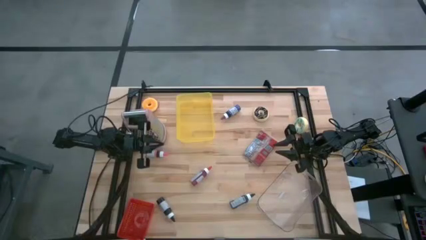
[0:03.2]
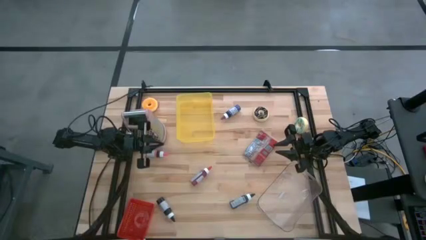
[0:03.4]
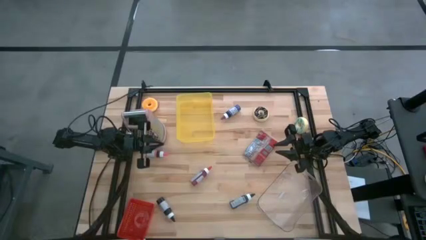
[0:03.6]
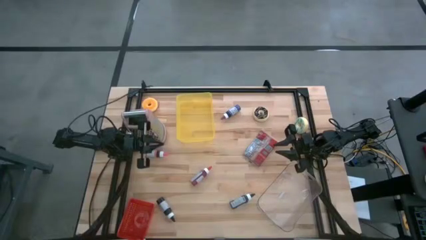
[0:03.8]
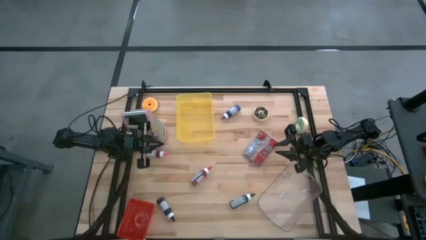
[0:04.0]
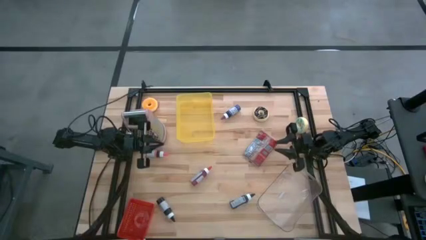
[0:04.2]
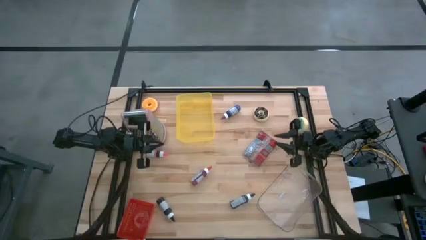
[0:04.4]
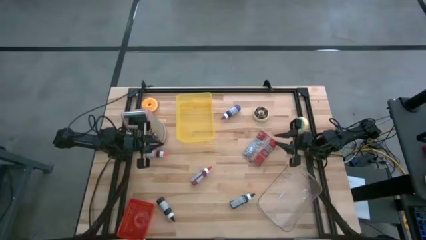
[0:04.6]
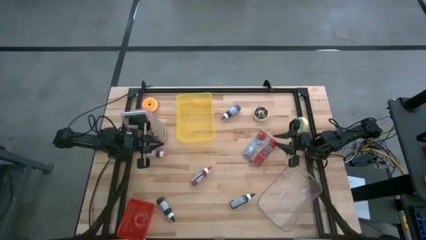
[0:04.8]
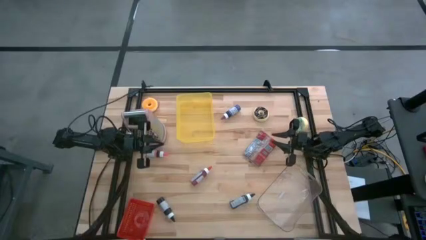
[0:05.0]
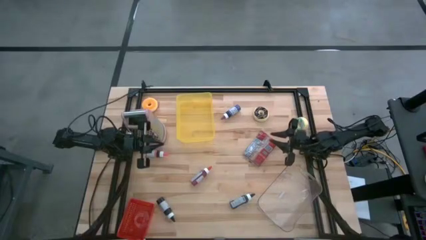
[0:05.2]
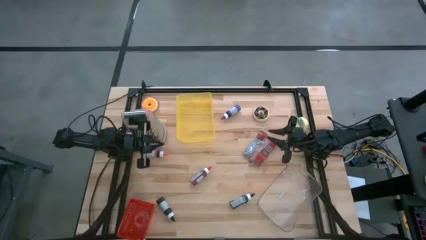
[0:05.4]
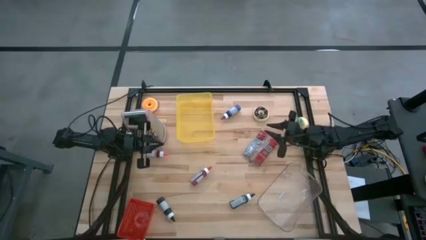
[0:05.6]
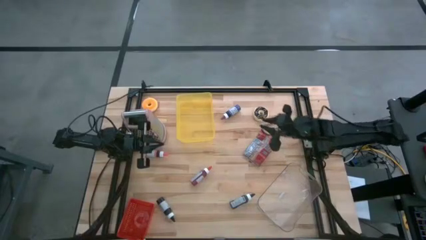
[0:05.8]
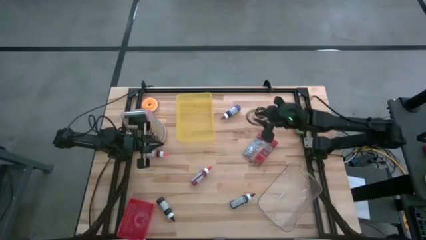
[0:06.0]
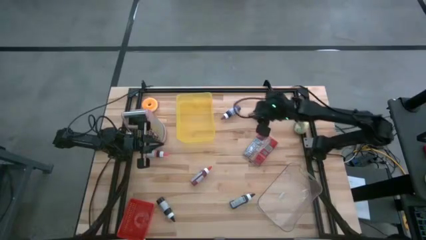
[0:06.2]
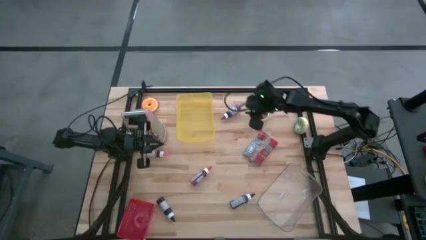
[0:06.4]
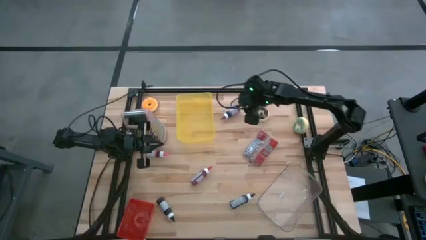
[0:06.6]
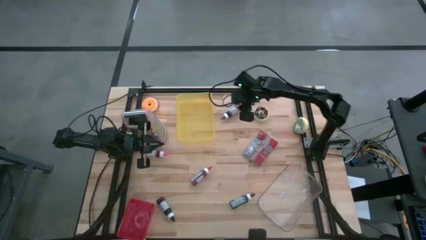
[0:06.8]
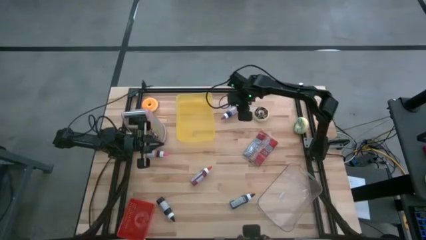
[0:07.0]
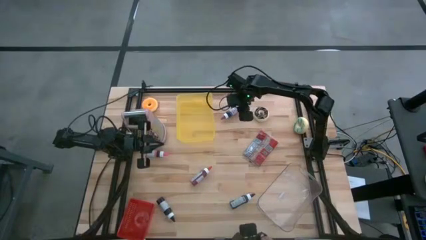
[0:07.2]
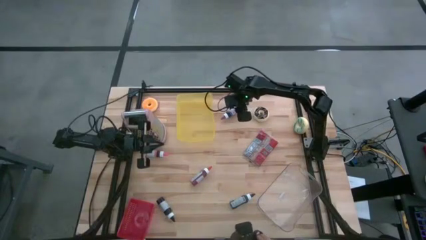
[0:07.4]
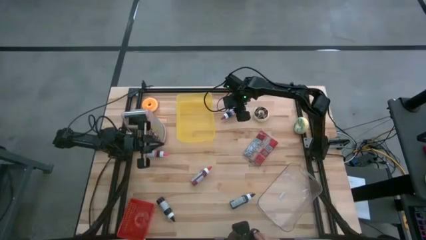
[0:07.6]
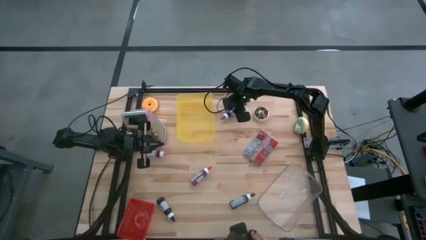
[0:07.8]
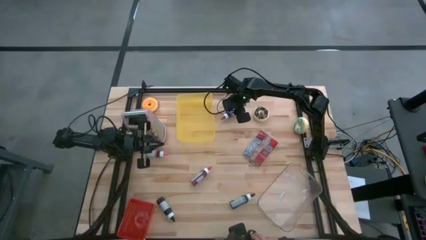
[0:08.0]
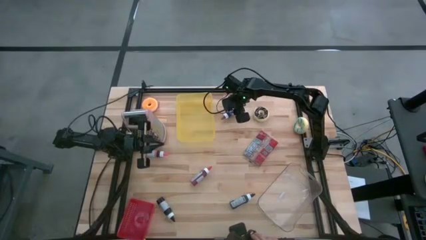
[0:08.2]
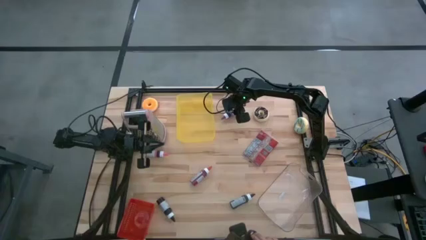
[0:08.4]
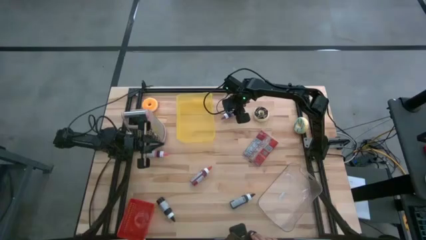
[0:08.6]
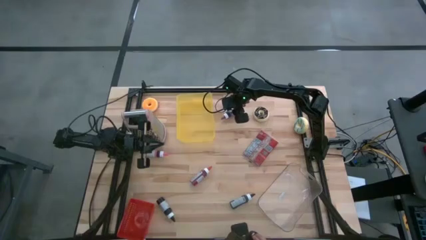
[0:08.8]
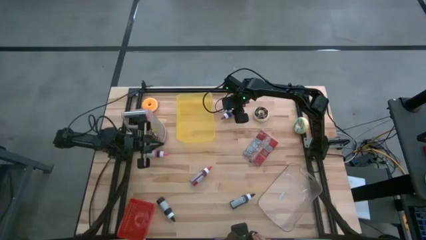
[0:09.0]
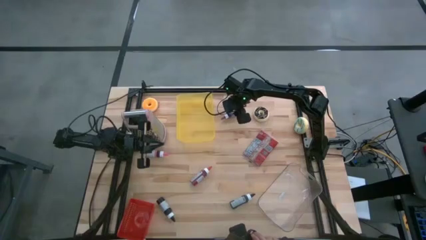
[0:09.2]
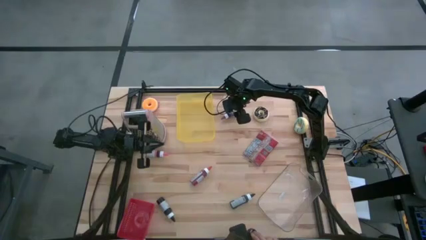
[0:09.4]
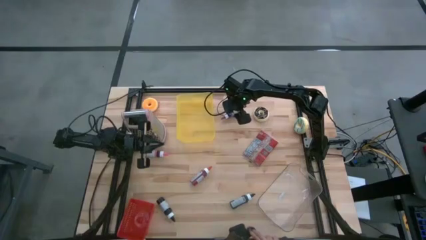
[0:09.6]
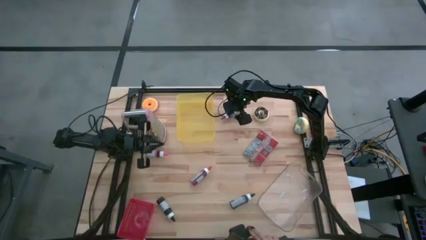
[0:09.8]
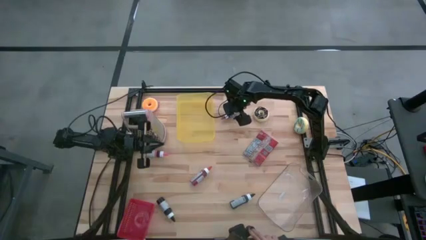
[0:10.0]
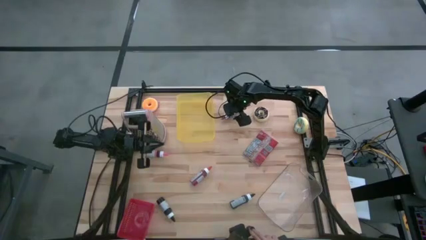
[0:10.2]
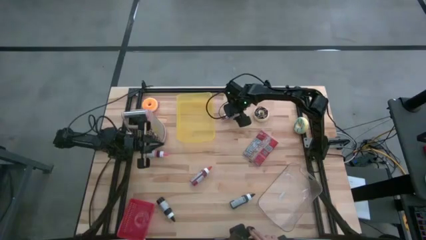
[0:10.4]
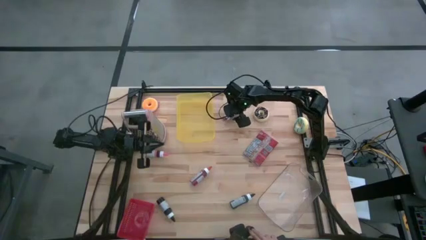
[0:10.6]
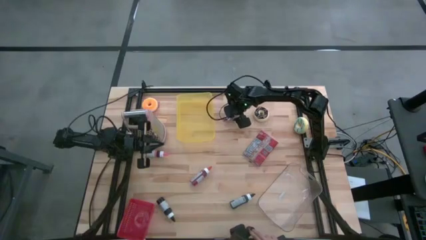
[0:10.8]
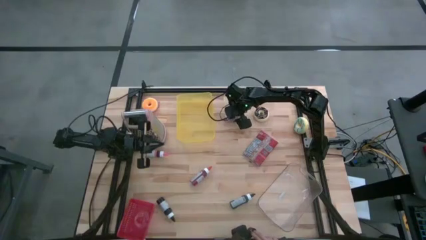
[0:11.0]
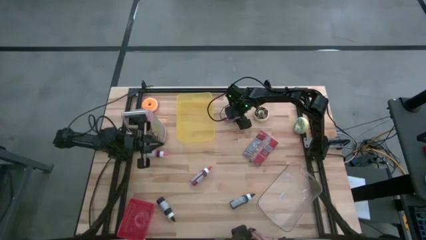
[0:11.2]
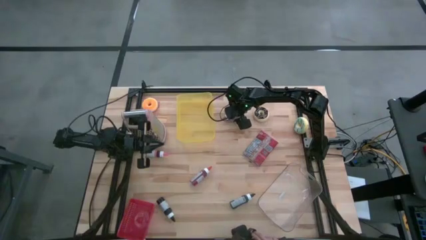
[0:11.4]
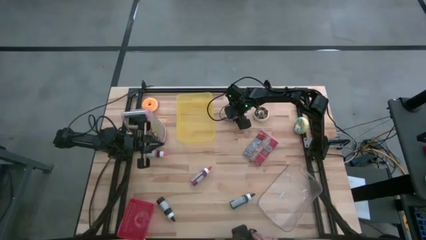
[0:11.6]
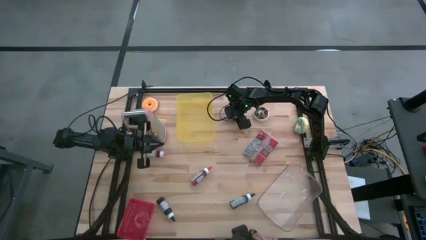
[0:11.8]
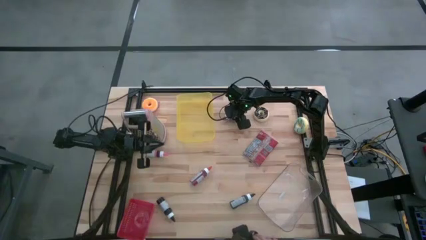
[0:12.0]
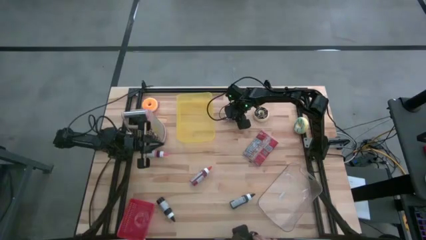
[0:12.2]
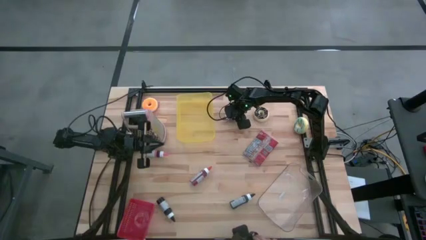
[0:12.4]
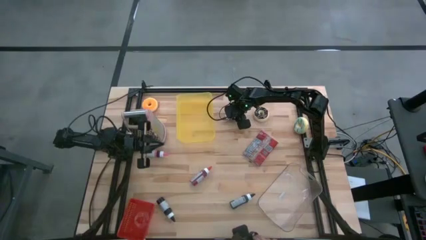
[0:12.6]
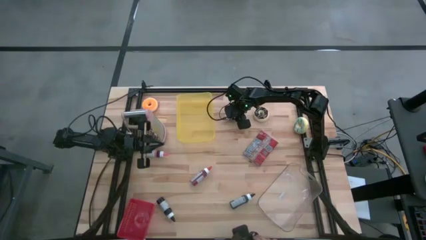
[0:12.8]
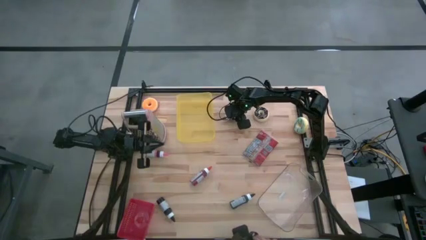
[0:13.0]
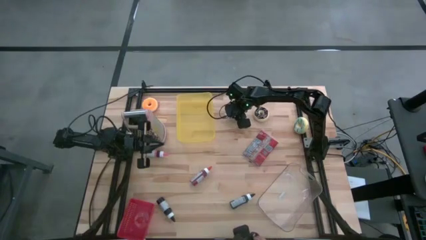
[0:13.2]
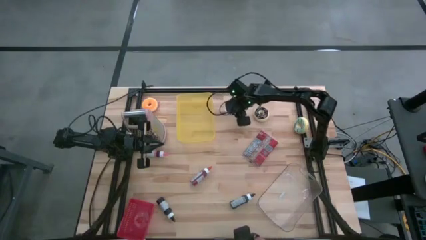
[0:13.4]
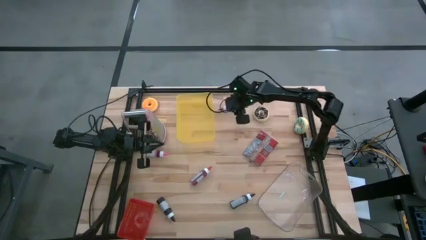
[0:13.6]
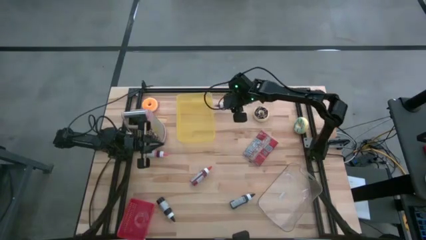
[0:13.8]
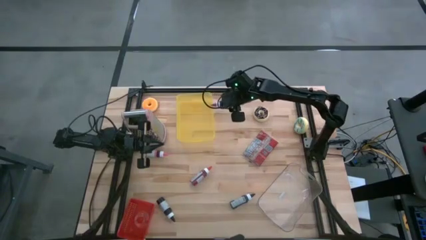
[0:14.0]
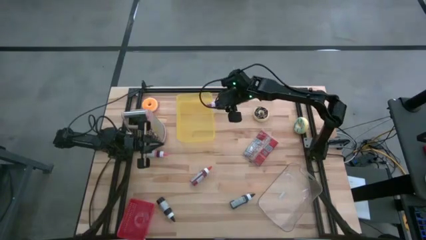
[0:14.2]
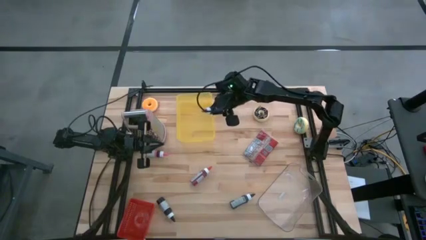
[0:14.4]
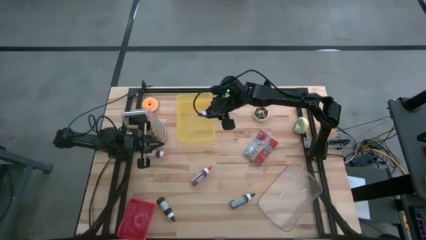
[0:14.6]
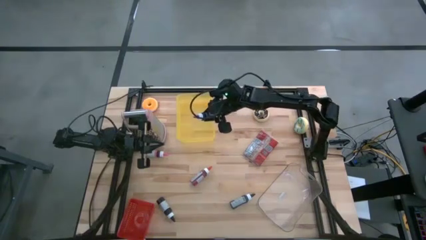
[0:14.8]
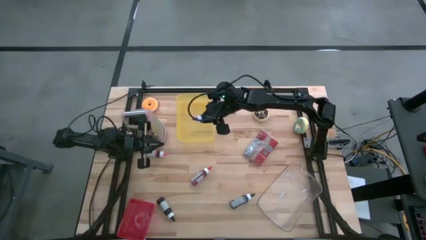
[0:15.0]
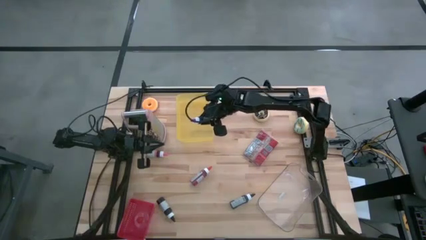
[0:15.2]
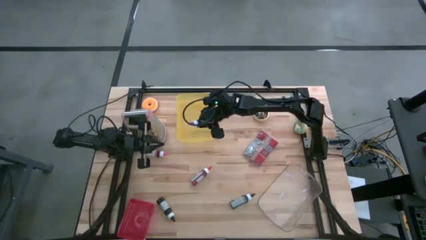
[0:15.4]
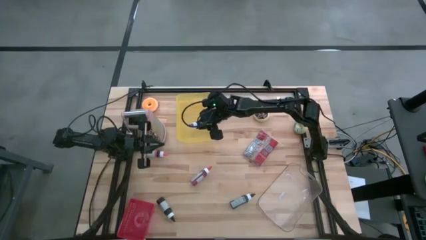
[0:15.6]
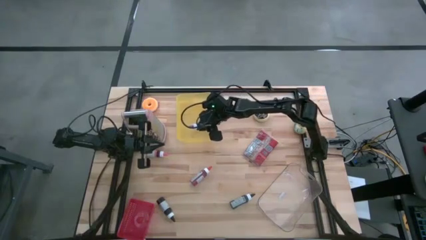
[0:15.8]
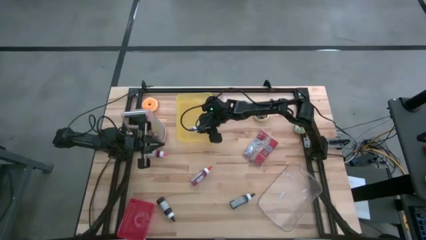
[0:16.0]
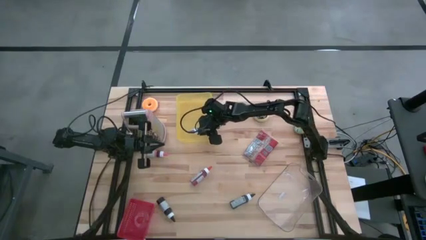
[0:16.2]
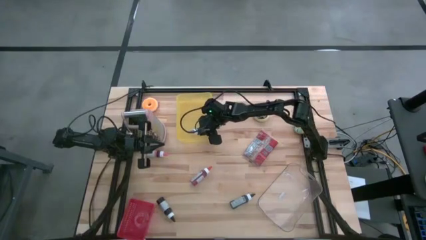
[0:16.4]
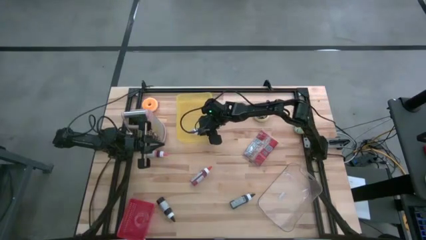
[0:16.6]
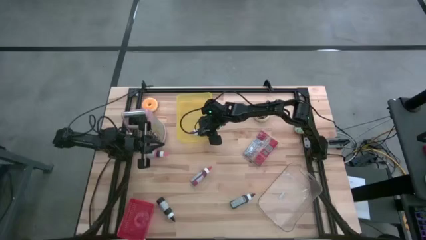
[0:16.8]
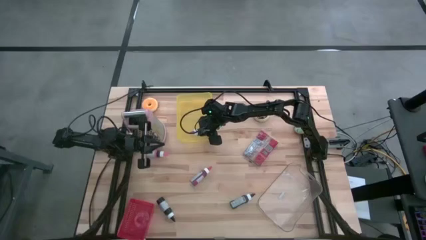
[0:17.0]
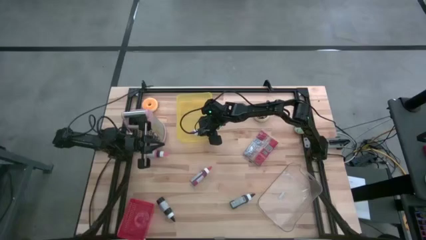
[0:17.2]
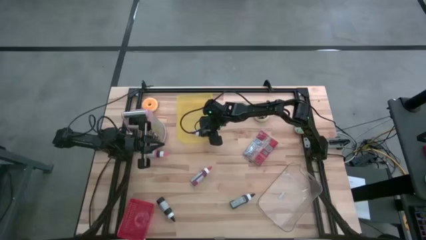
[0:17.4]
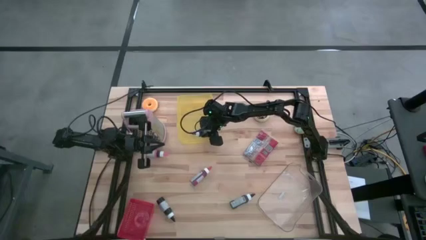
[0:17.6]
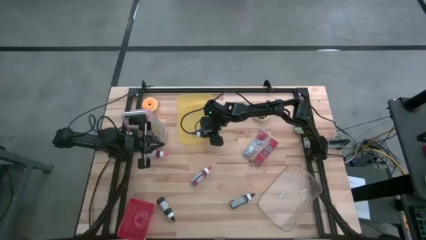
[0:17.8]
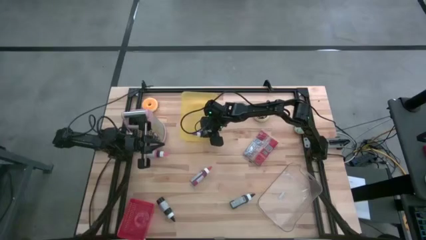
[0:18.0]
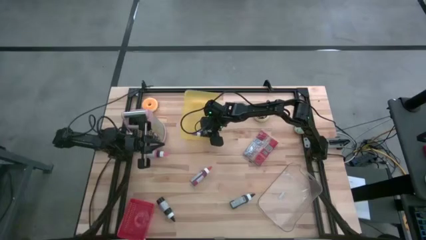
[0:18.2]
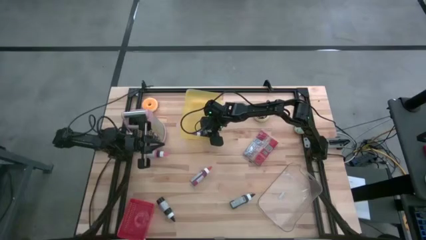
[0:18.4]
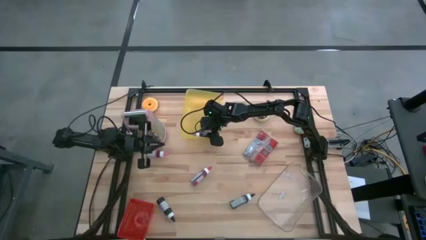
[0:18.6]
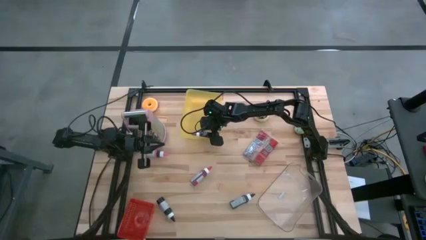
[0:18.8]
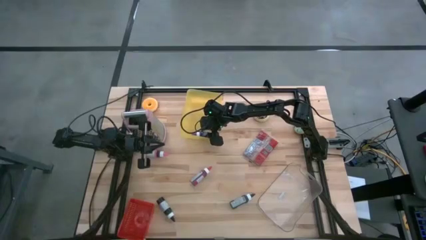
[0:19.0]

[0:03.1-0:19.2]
Task: Pick & Place Food Item
Put the purple food coloring into the yellow bin
